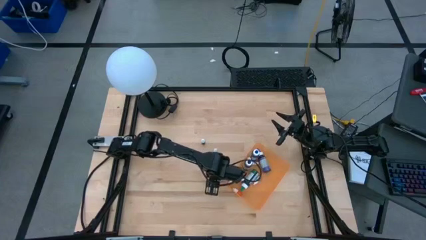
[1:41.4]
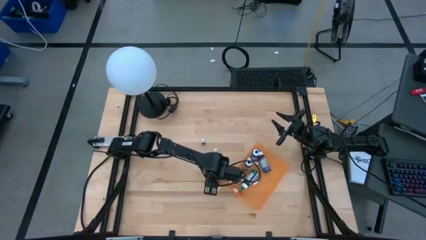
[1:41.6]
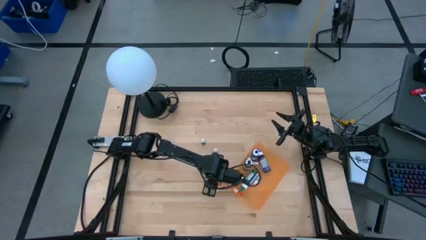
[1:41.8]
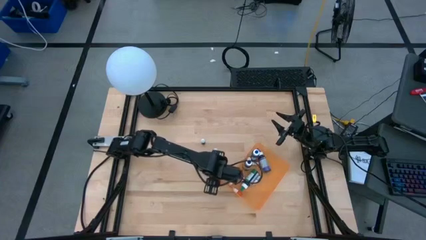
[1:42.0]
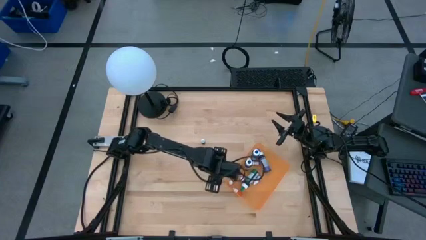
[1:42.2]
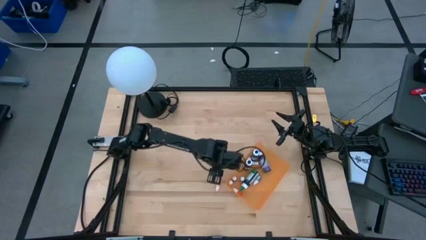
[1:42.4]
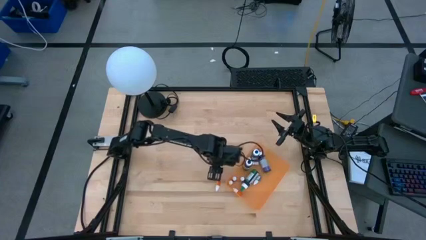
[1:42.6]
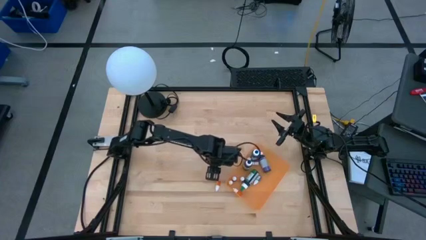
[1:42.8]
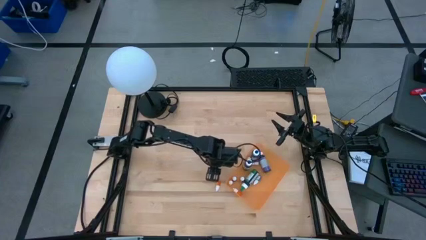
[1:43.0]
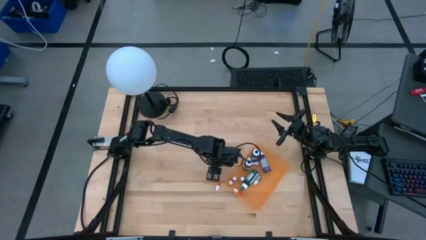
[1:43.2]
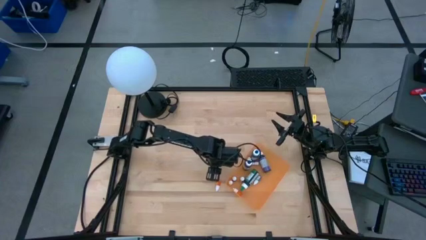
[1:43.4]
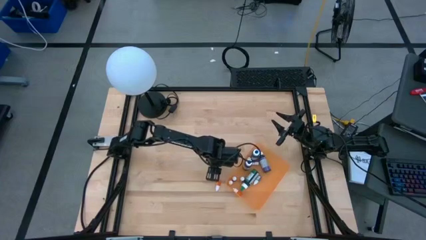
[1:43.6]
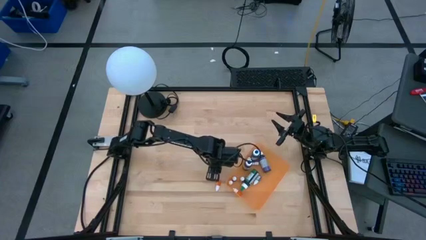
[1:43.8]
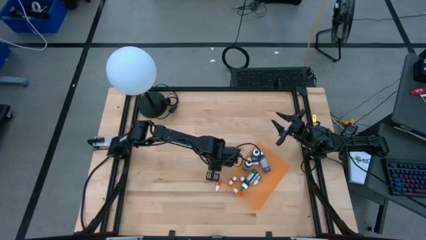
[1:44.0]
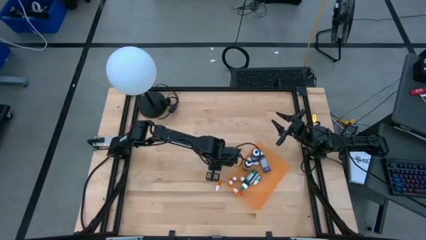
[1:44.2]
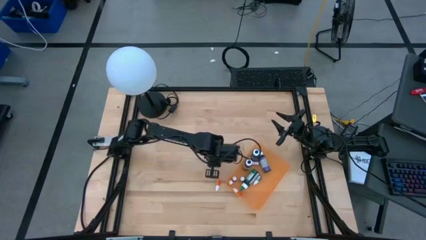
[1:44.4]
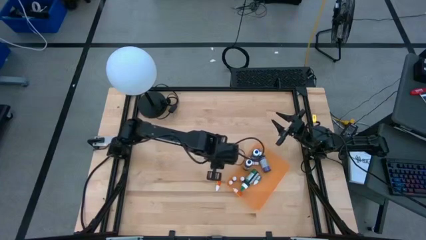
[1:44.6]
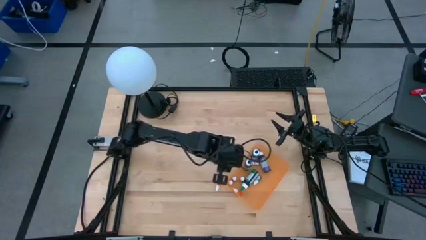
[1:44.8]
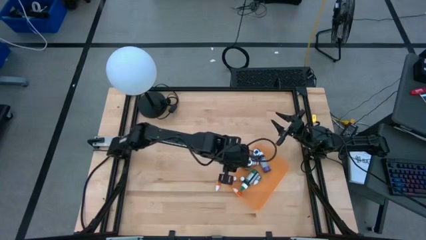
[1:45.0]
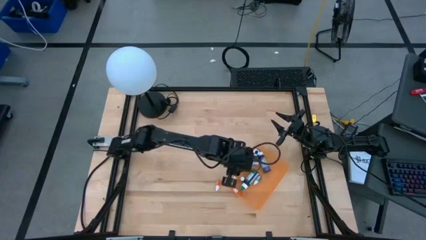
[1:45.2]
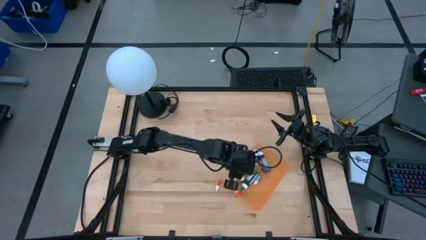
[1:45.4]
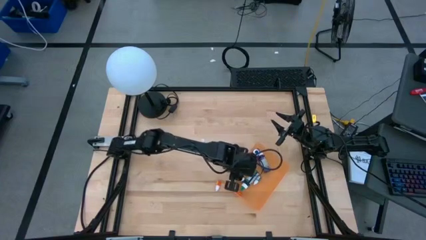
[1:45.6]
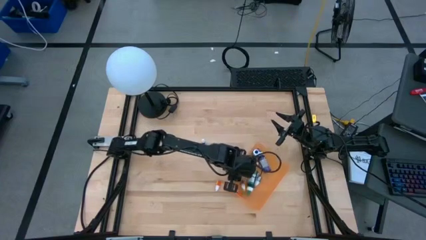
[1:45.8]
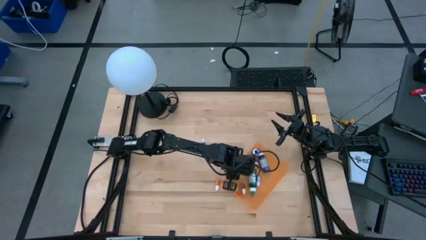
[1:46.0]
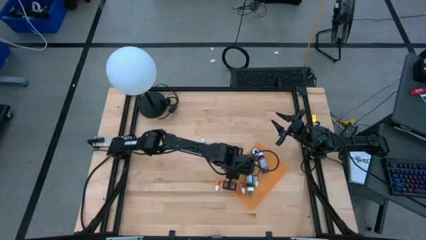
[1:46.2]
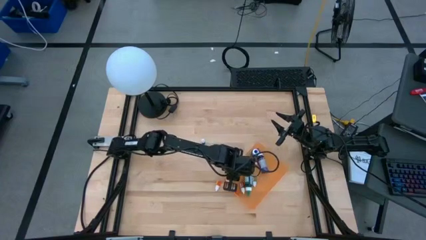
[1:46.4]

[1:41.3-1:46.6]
Task: Pick & Place food coloring
Put the bottom small blue food coloring bottle into the orange bin

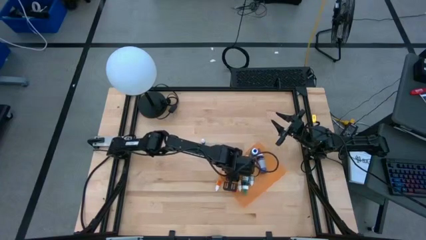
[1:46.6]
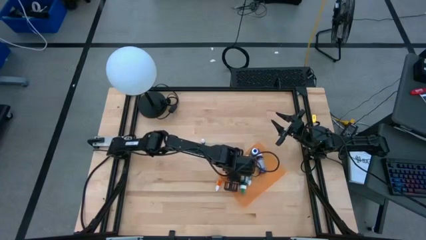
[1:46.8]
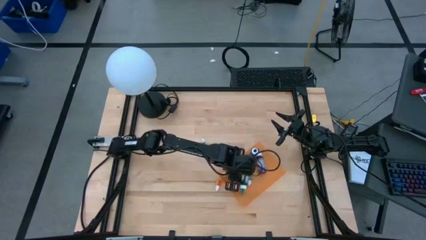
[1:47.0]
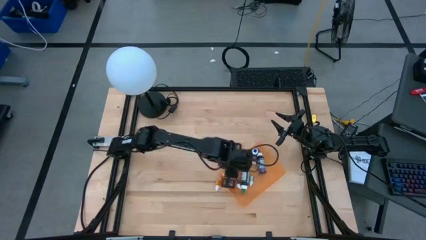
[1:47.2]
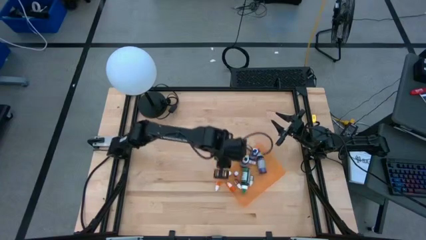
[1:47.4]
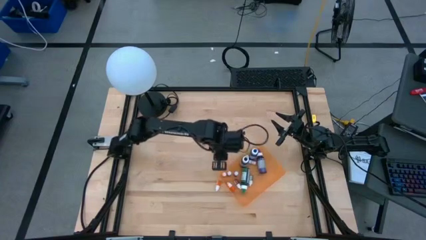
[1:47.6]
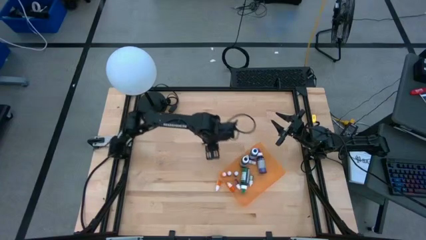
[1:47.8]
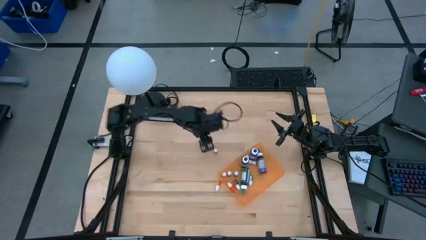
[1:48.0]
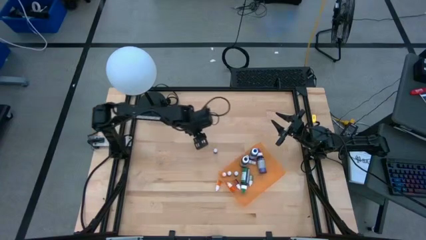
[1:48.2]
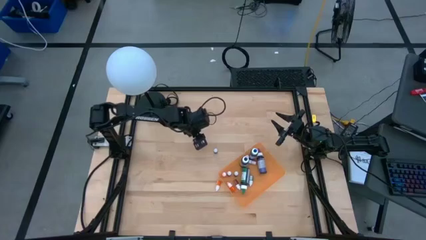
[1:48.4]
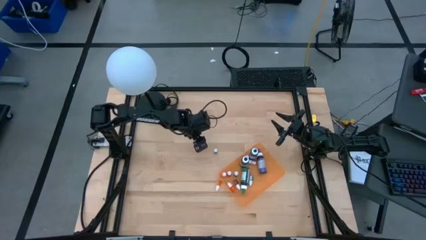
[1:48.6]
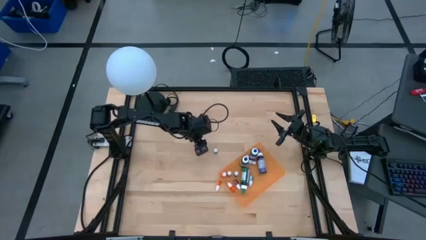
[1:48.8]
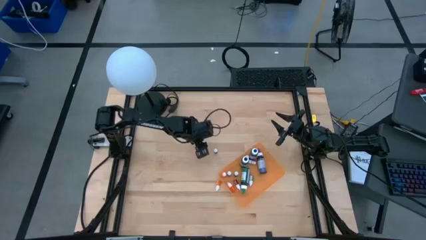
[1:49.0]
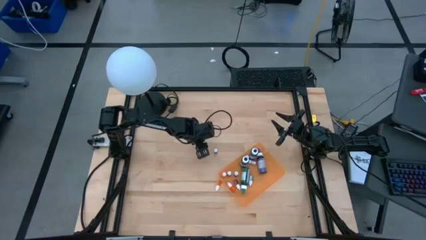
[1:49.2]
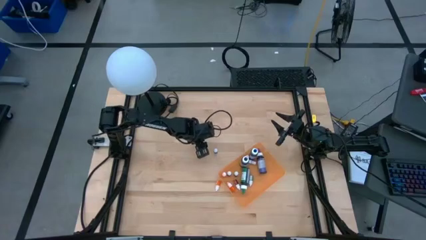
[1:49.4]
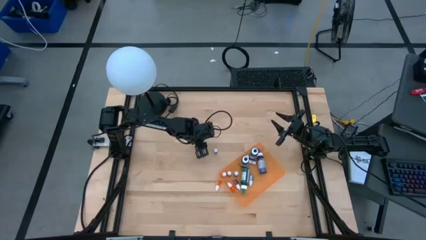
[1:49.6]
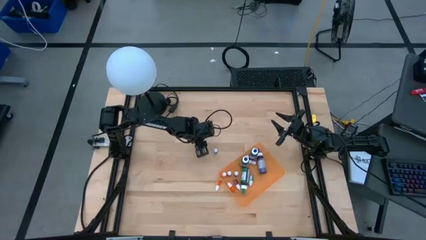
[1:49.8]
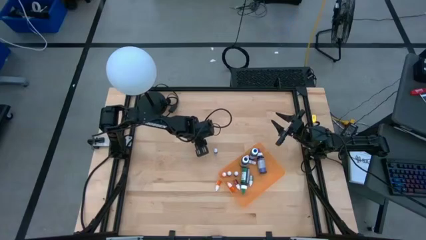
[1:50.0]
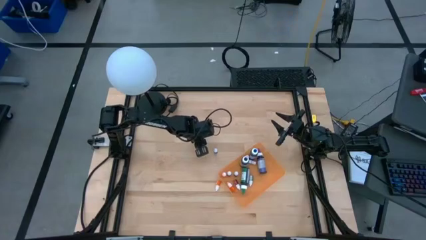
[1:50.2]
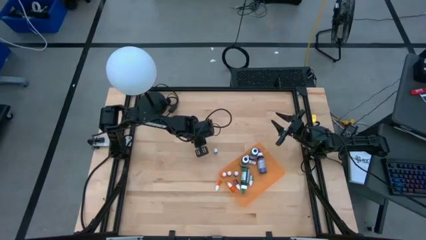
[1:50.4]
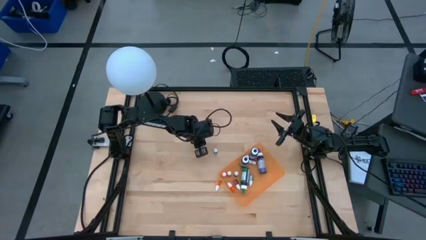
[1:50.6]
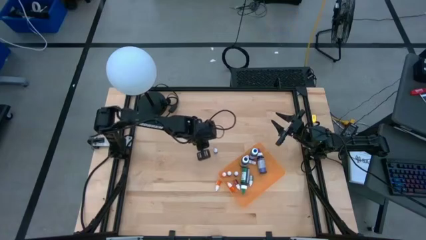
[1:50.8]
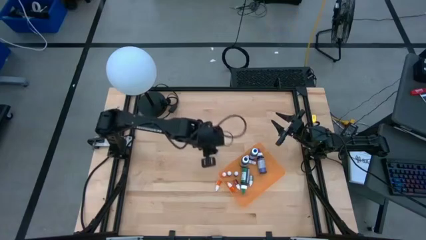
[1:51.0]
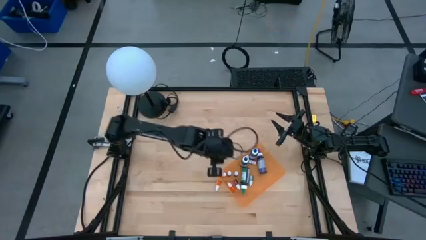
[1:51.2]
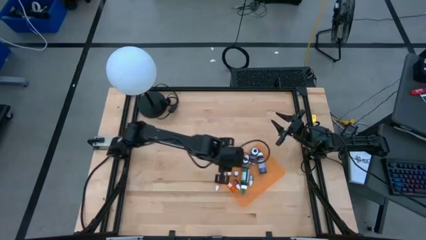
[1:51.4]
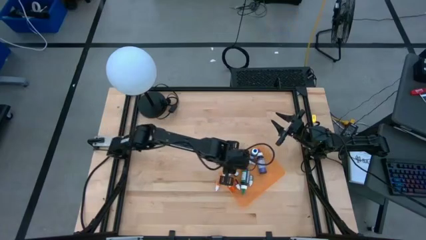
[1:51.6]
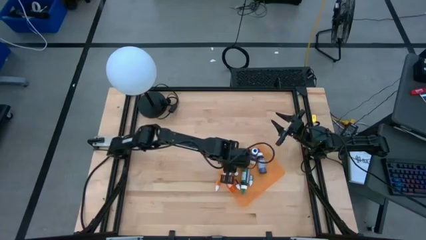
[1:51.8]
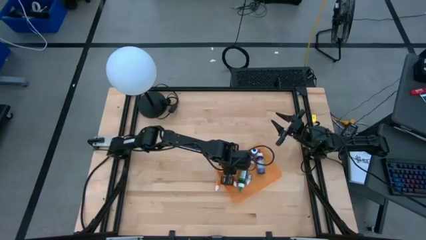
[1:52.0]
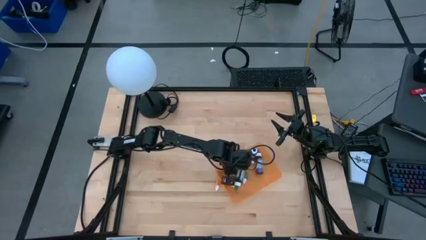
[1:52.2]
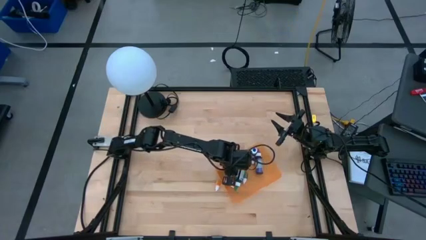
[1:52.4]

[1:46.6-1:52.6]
Put the small purple food coloring bottle into the orange bin

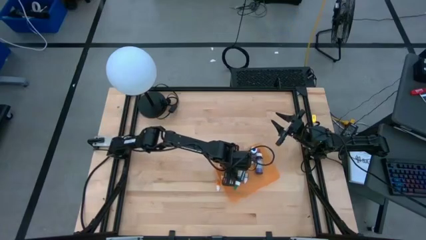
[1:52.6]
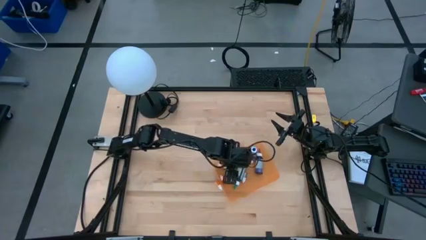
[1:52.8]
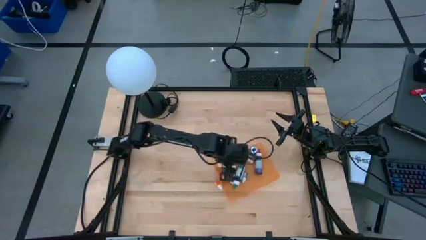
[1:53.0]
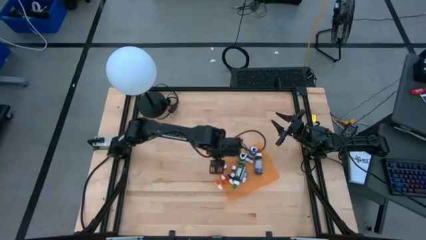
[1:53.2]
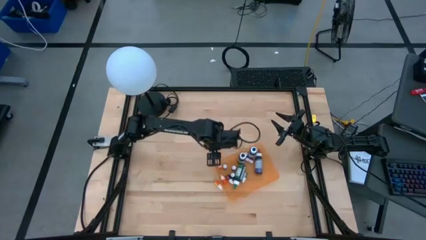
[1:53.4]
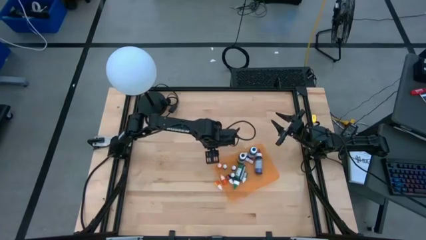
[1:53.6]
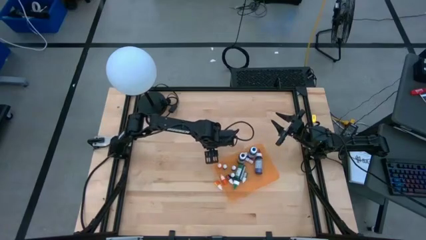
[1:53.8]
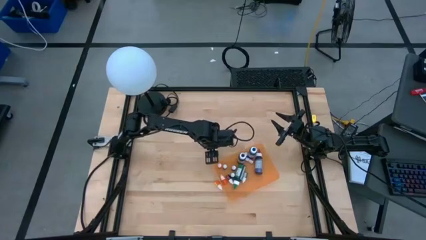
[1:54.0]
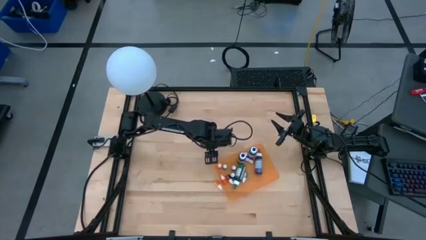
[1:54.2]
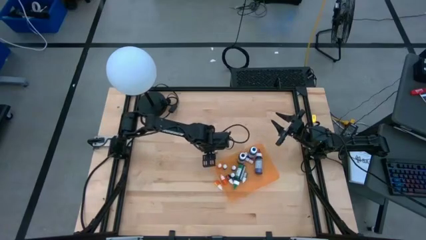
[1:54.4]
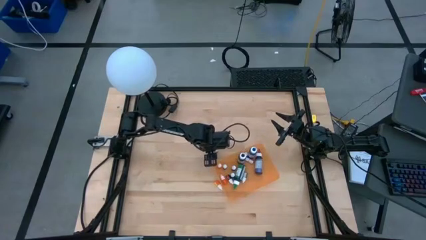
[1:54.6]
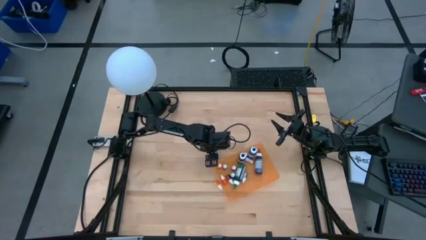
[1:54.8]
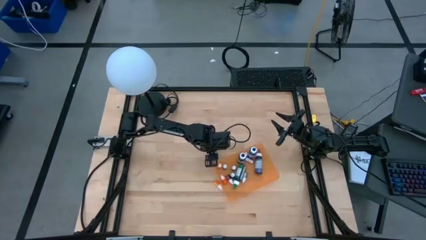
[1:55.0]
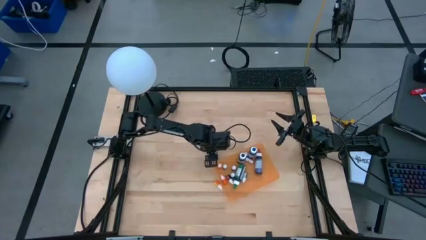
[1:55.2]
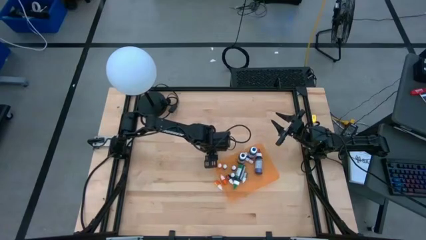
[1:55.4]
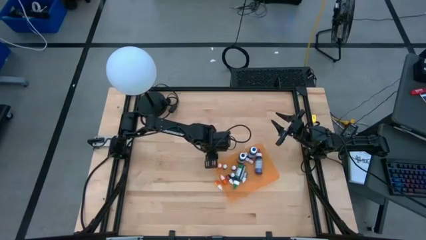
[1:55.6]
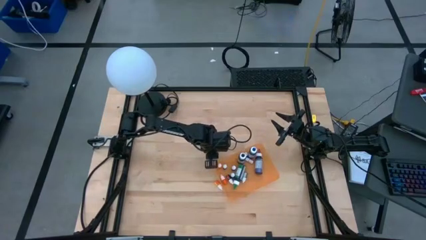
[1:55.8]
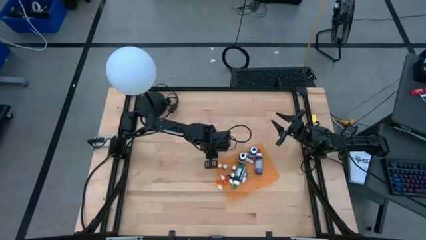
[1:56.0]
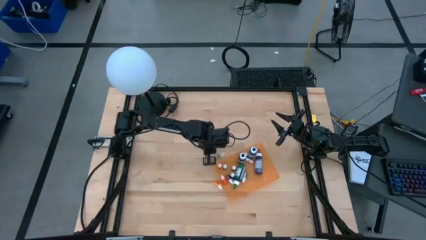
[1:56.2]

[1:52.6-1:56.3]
Put the small blue food coloring bottle into the orange bin
